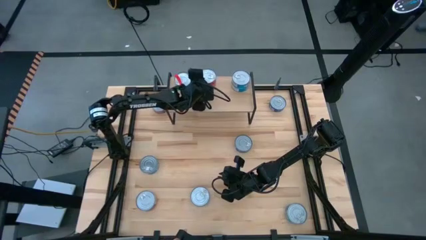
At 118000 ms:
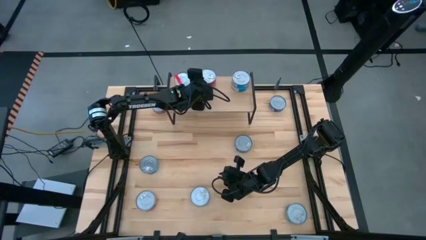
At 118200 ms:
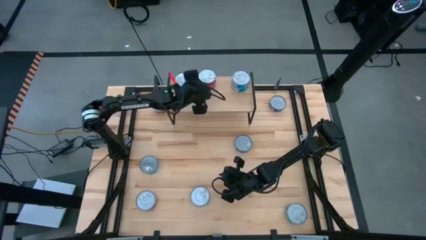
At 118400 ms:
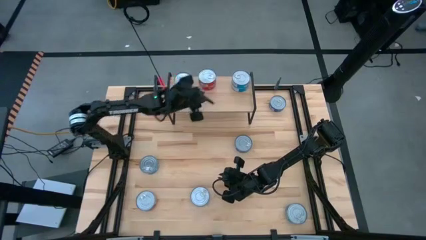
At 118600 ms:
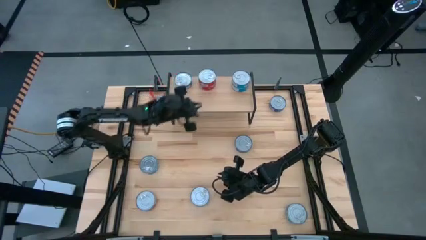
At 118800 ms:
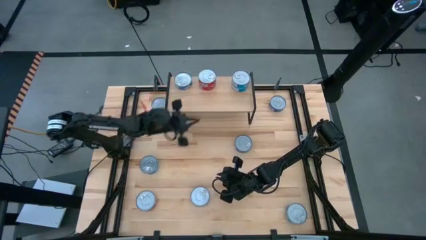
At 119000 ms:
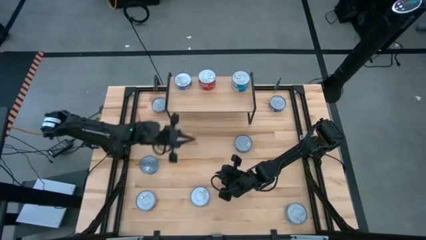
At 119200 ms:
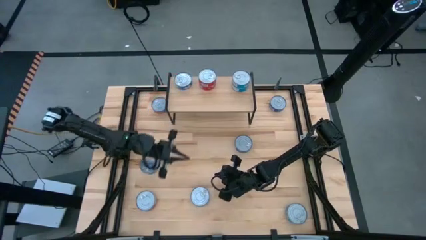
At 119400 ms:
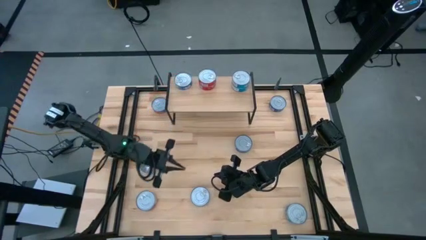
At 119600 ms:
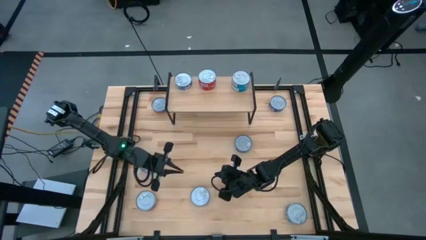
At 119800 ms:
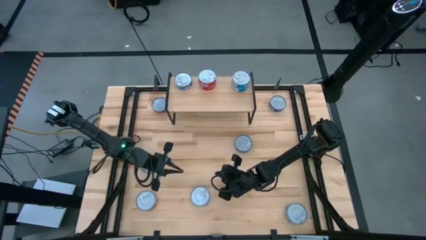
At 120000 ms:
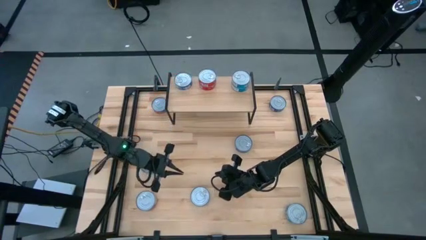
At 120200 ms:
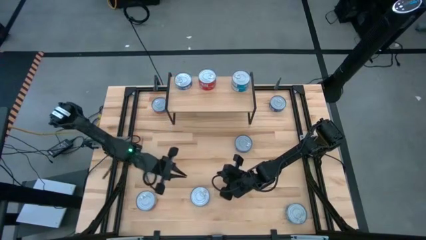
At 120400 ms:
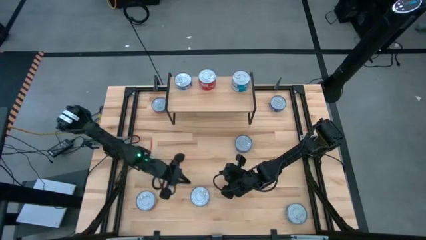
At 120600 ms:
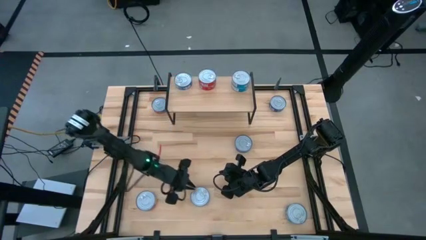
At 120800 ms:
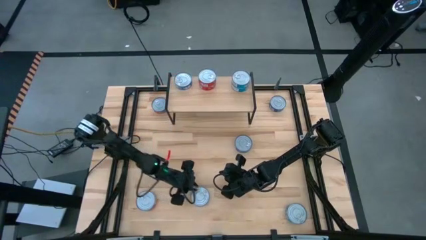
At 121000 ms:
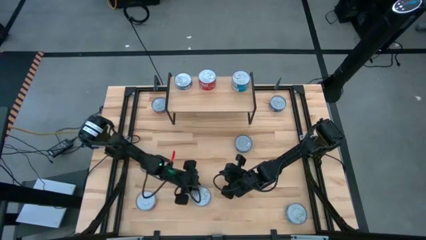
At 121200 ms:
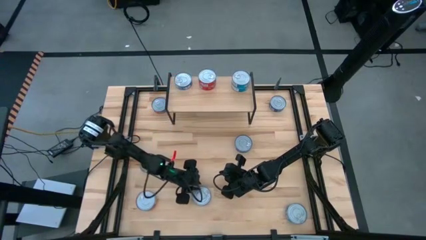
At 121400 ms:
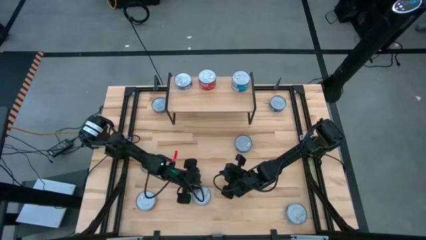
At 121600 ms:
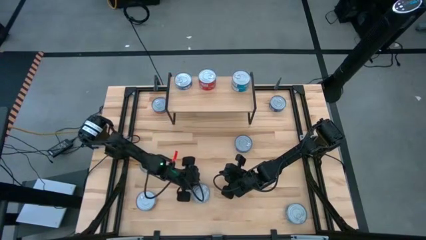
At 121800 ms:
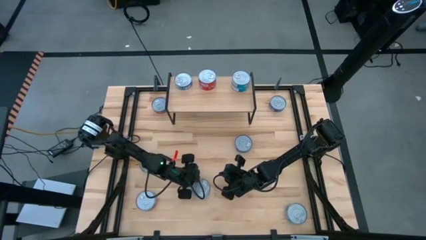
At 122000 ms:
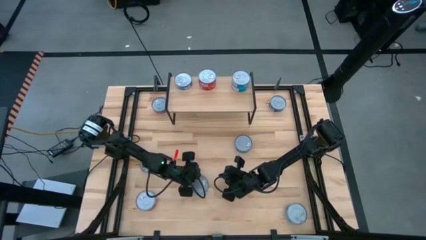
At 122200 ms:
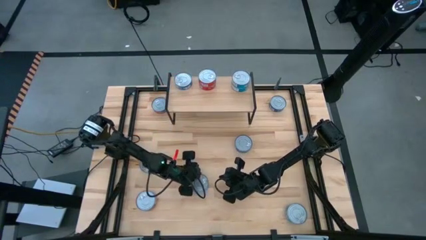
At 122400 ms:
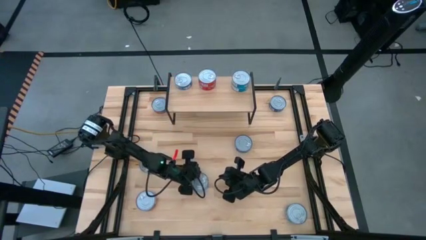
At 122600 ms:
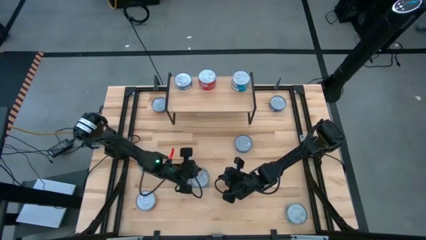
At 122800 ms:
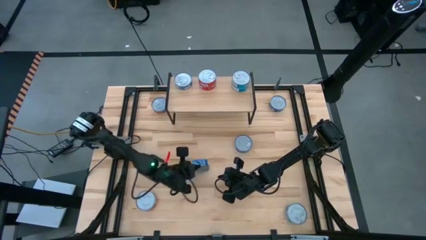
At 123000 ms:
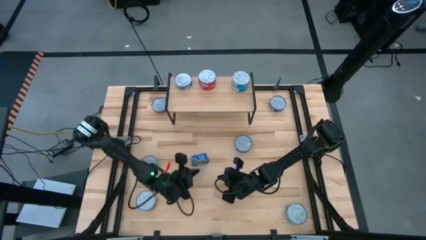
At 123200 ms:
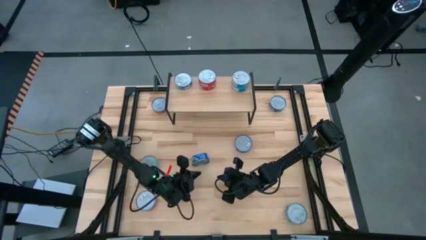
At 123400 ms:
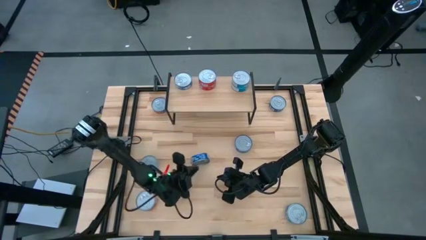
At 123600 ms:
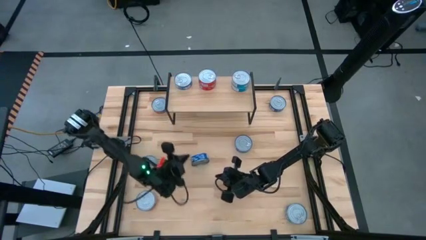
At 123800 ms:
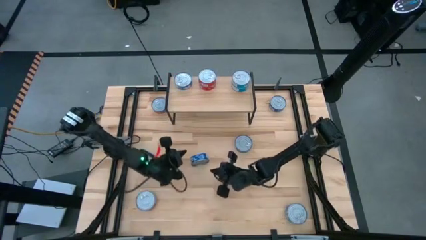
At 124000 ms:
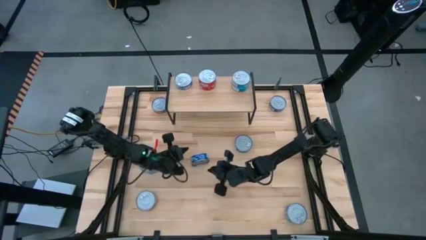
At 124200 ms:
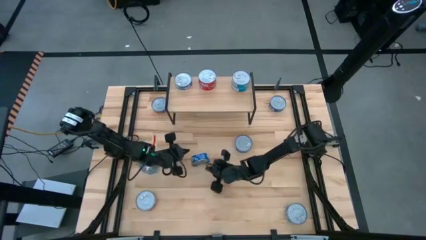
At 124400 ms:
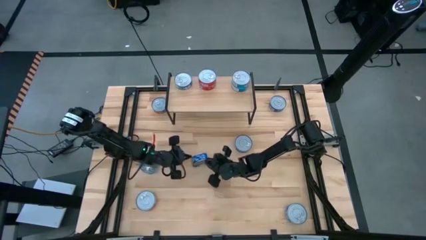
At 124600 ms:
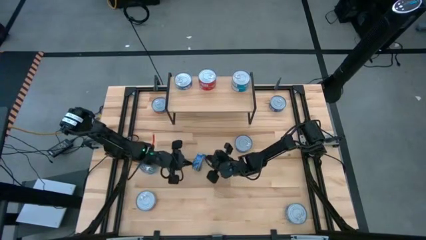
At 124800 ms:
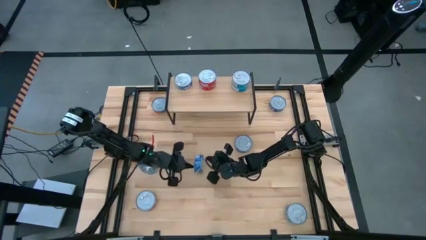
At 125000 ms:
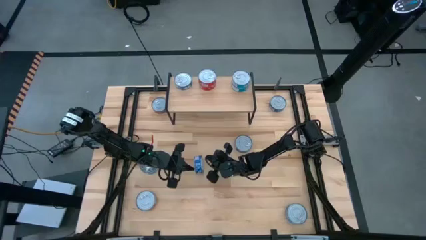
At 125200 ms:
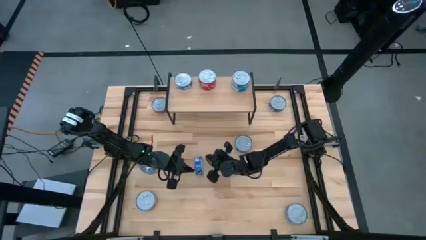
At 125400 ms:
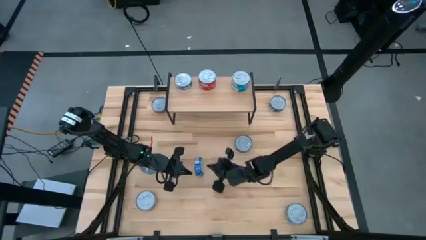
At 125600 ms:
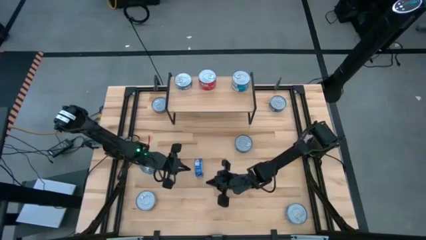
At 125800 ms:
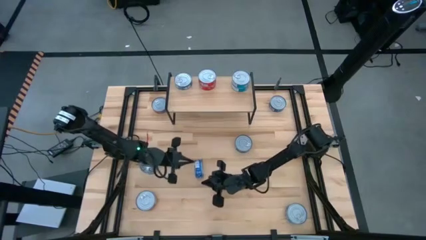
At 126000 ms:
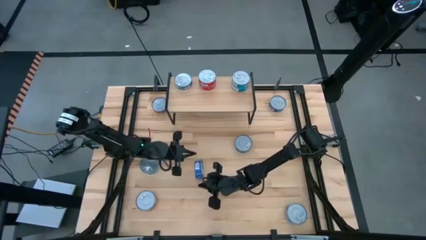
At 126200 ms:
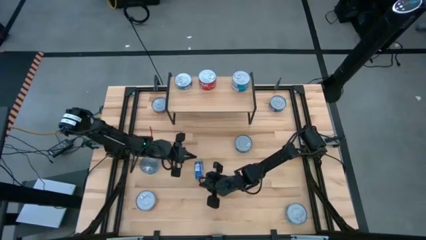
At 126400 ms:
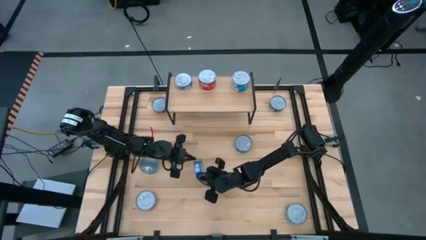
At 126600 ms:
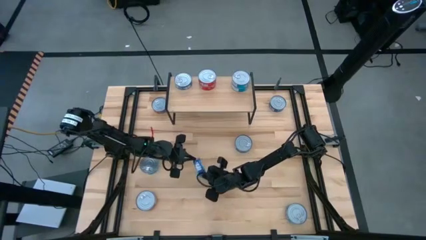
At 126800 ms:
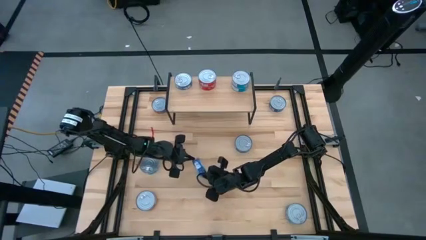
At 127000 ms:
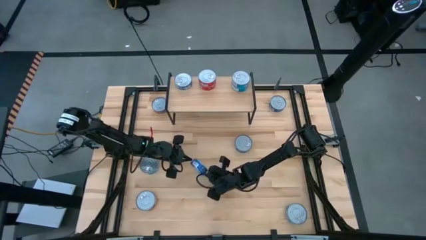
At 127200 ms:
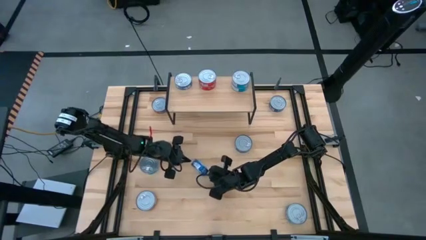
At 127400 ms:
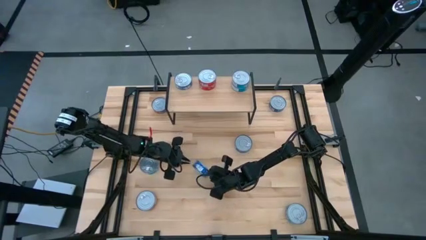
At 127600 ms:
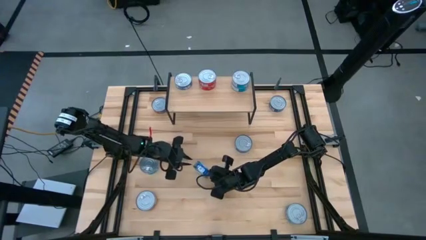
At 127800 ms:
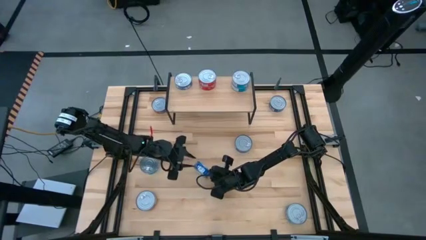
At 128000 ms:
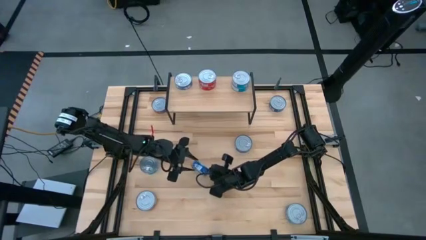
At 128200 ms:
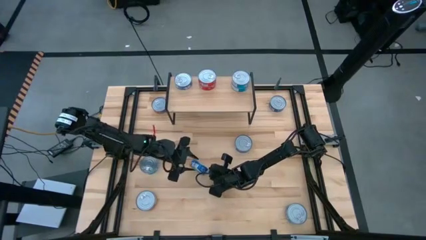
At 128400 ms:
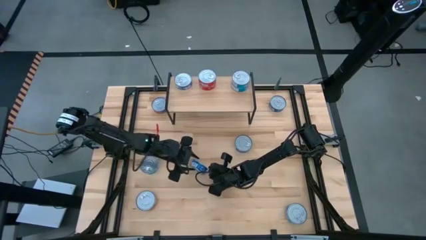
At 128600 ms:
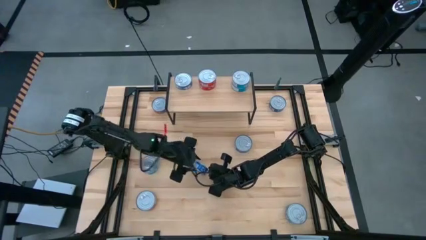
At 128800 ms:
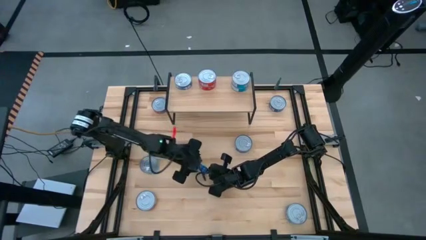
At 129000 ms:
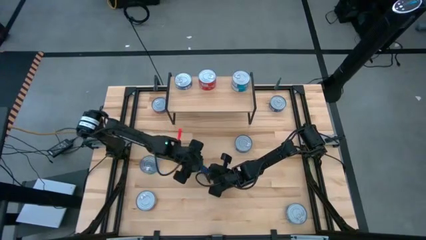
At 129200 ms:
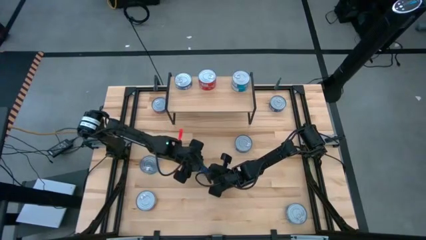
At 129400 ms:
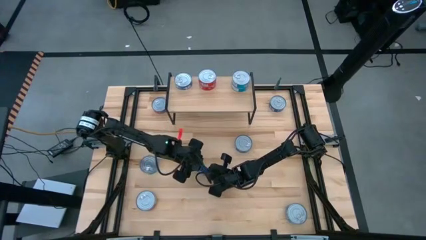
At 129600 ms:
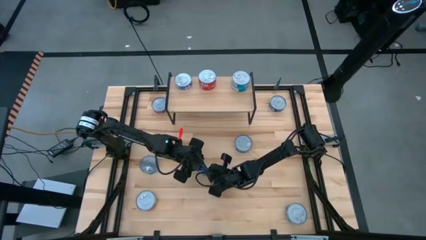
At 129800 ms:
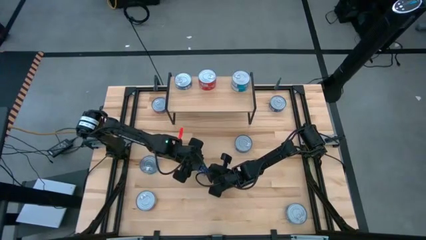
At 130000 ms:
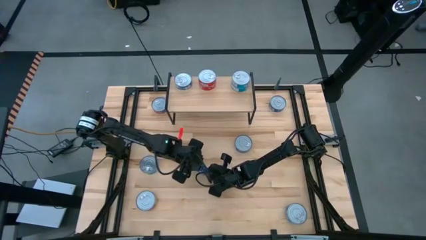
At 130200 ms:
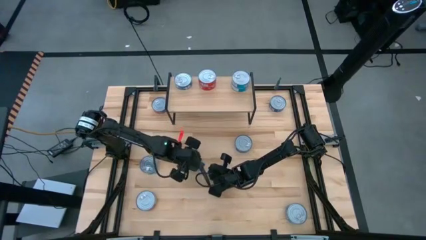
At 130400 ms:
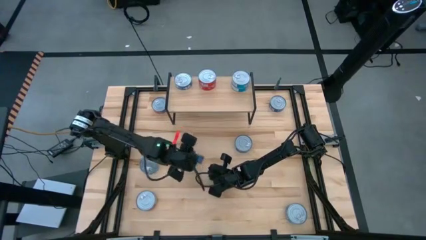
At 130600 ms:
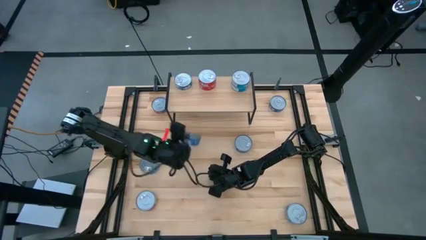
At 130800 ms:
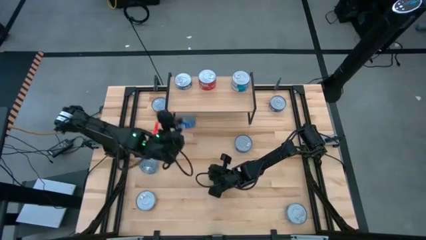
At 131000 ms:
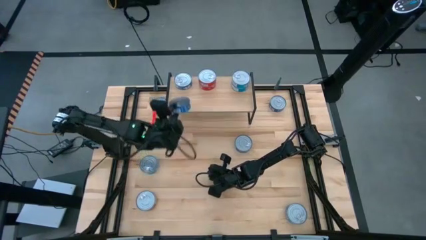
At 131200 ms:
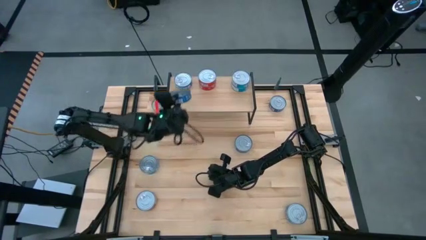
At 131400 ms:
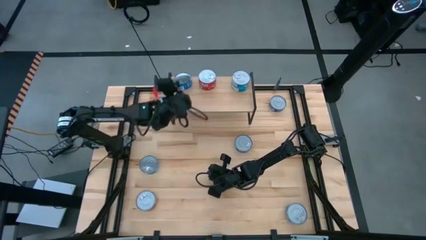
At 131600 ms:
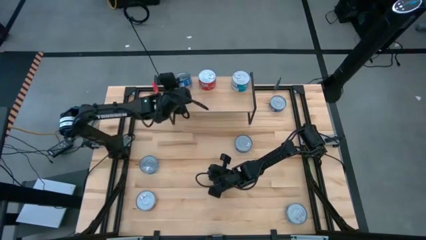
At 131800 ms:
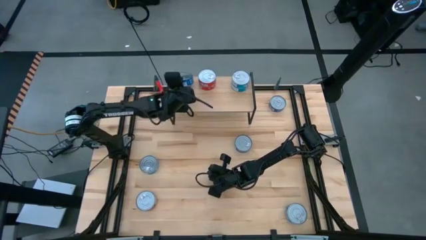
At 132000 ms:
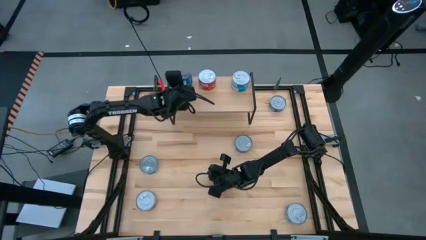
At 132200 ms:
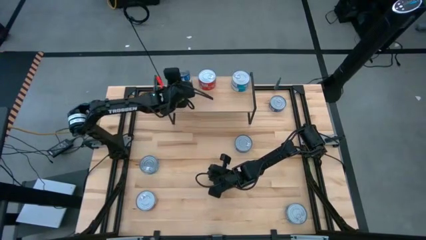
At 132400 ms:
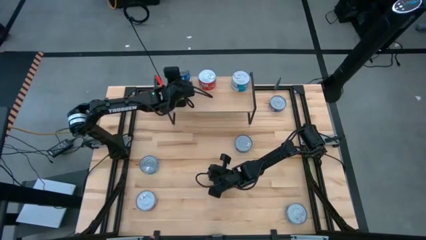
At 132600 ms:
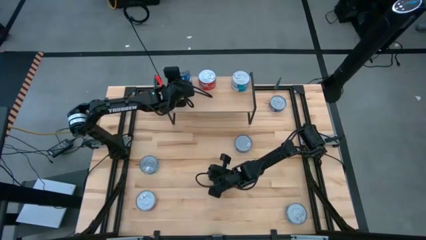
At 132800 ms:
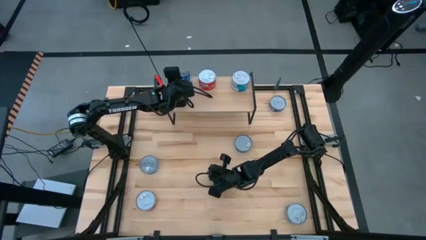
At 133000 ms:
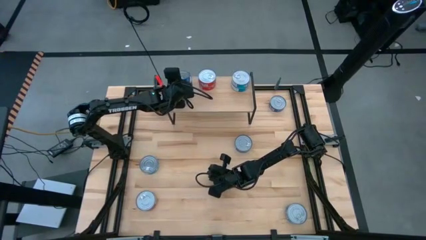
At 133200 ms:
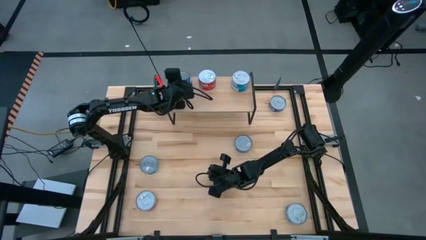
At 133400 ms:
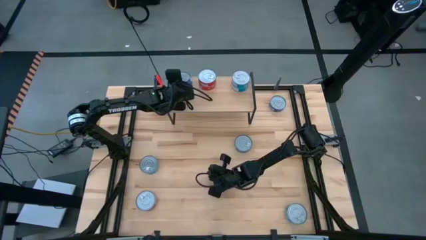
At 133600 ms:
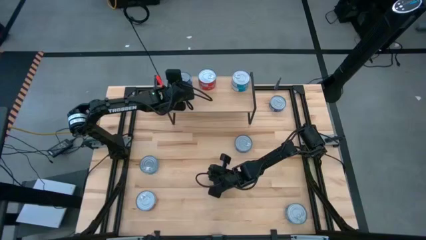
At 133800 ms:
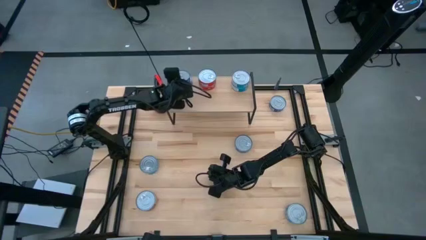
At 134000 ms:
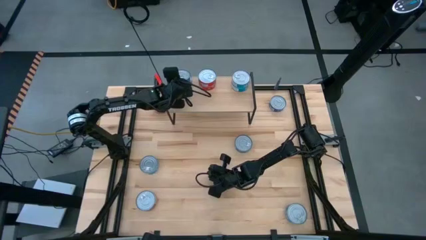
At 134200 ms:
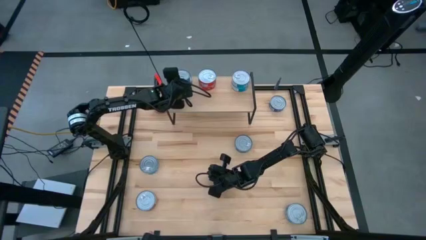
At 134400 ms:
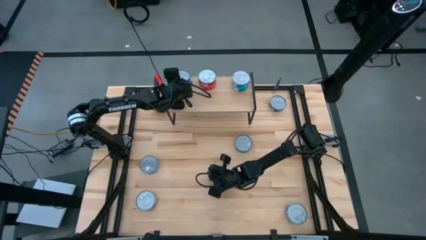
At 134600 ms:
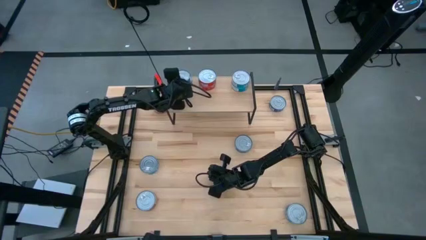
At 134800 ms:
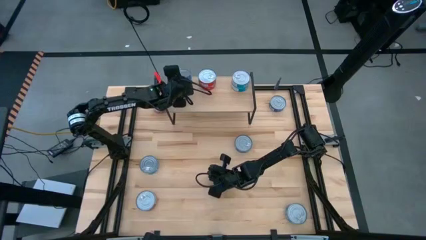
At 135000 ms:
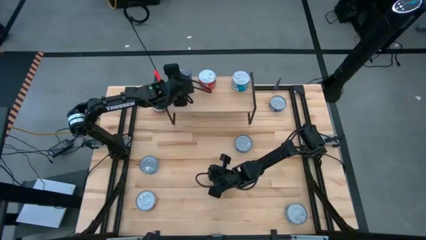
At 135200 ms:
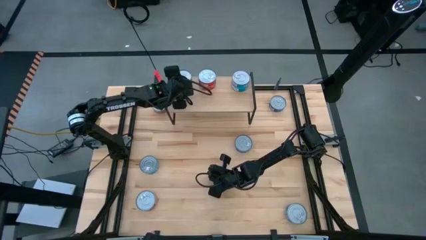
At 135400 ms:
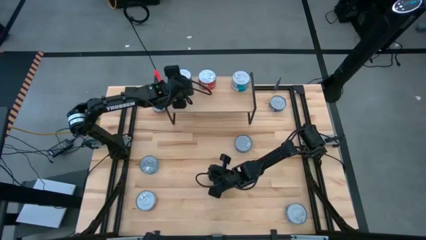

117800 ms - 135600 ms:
Task: Stack canned seafood by type on shelf
Stack the blue tuna can on top of the blue tuna can on the shelf
